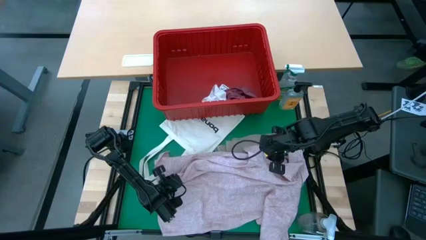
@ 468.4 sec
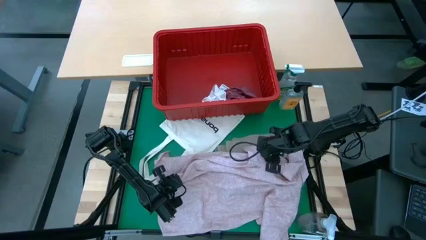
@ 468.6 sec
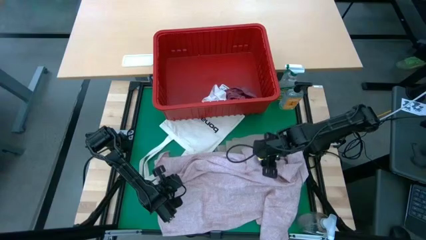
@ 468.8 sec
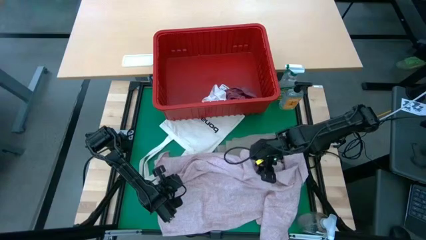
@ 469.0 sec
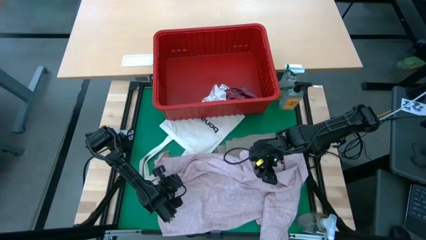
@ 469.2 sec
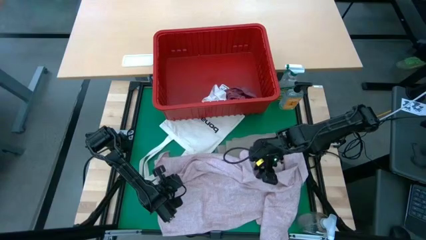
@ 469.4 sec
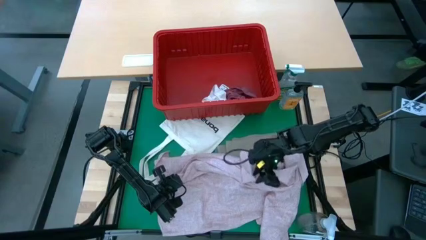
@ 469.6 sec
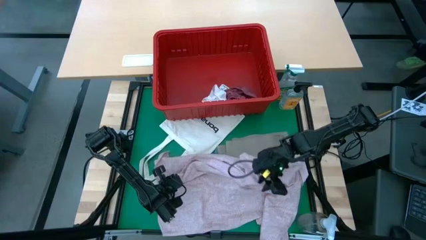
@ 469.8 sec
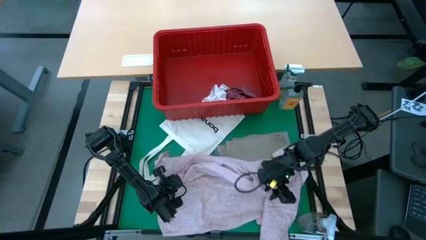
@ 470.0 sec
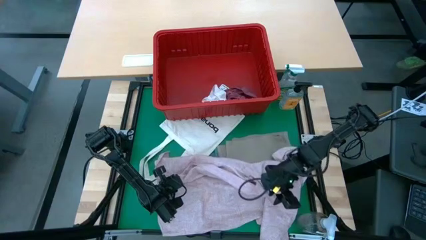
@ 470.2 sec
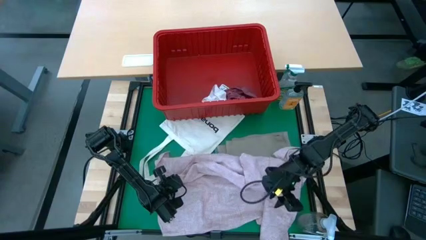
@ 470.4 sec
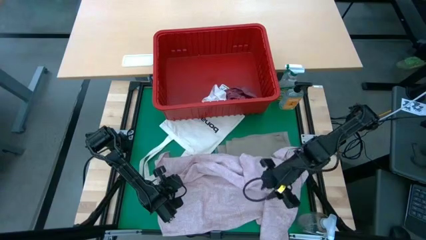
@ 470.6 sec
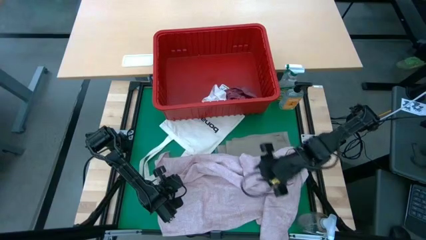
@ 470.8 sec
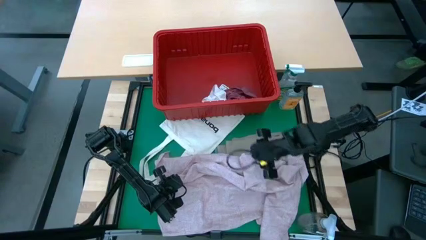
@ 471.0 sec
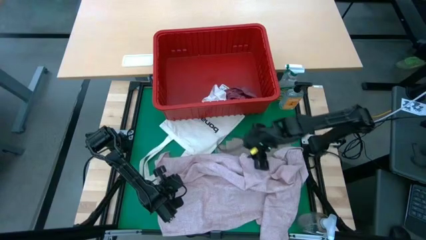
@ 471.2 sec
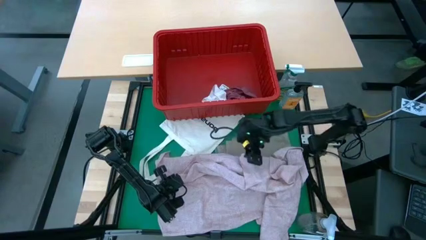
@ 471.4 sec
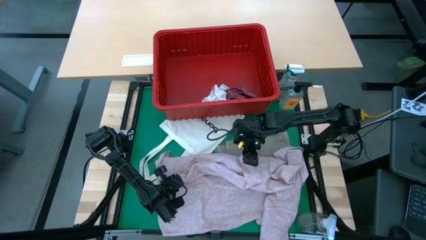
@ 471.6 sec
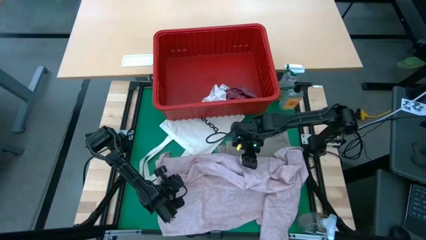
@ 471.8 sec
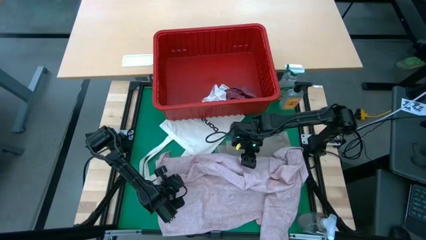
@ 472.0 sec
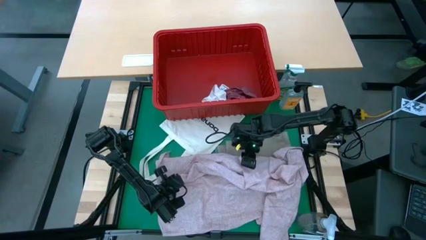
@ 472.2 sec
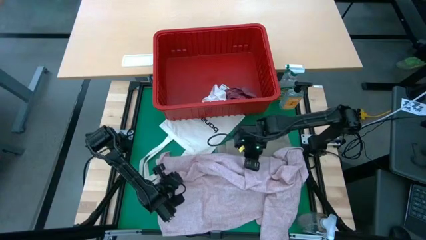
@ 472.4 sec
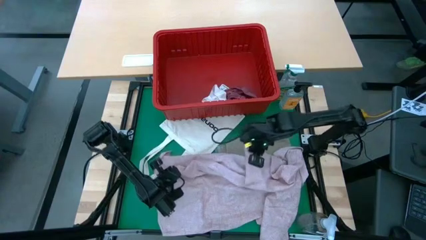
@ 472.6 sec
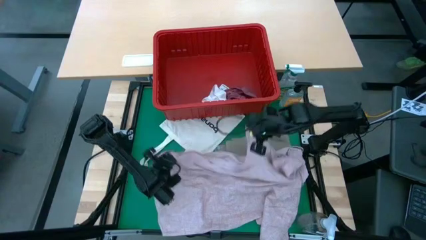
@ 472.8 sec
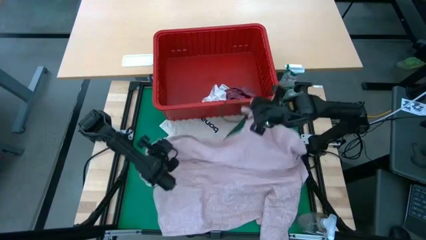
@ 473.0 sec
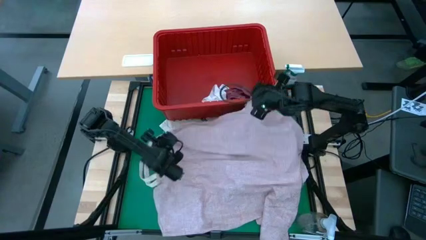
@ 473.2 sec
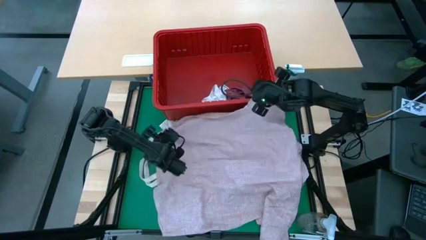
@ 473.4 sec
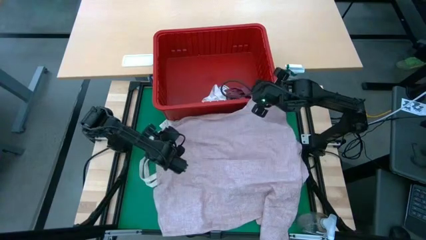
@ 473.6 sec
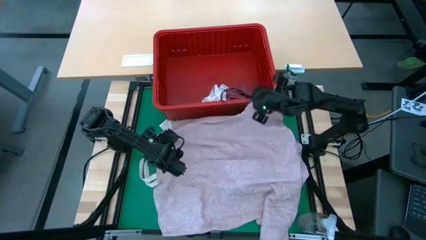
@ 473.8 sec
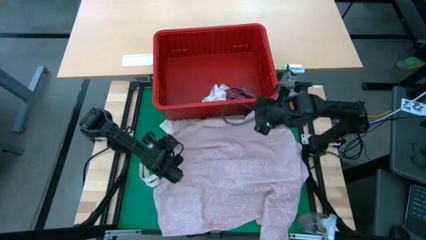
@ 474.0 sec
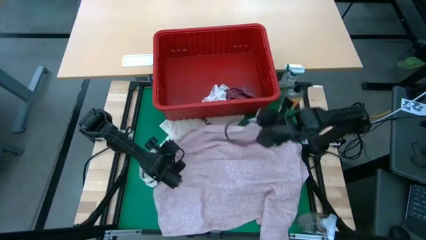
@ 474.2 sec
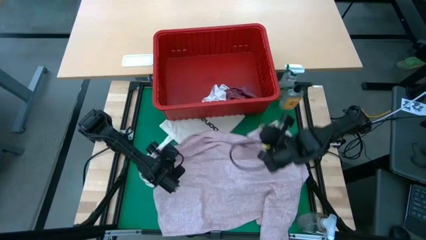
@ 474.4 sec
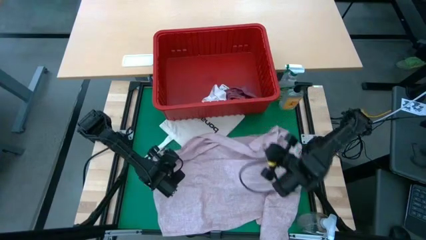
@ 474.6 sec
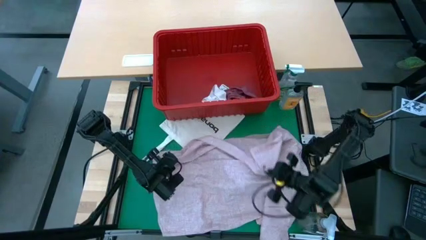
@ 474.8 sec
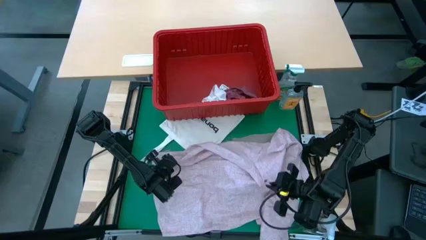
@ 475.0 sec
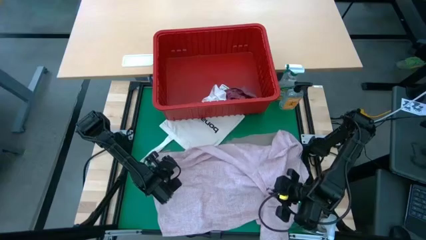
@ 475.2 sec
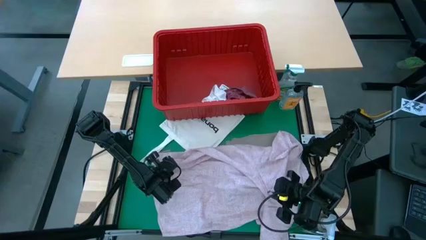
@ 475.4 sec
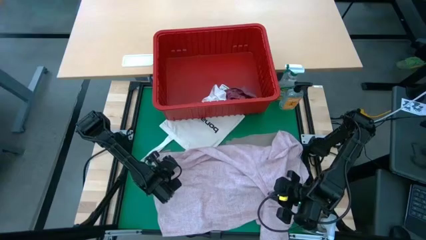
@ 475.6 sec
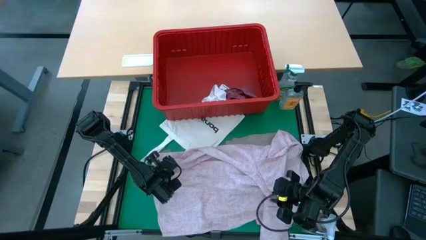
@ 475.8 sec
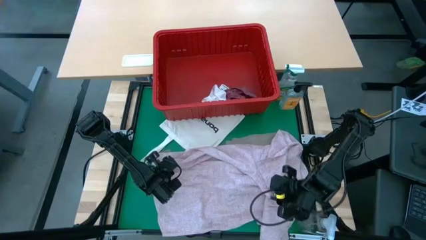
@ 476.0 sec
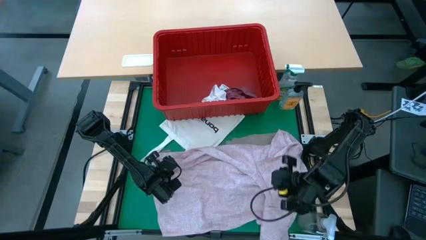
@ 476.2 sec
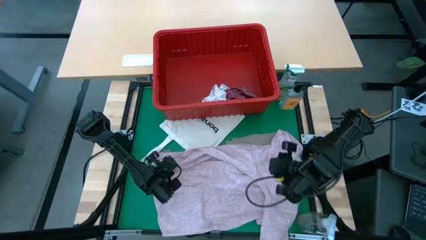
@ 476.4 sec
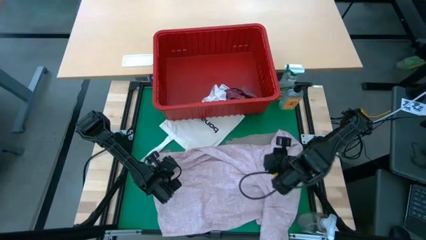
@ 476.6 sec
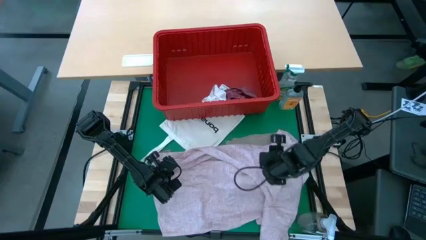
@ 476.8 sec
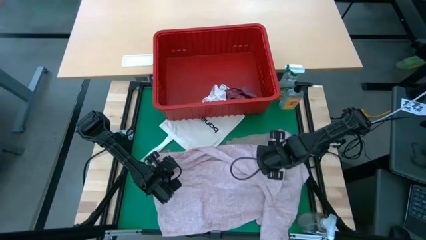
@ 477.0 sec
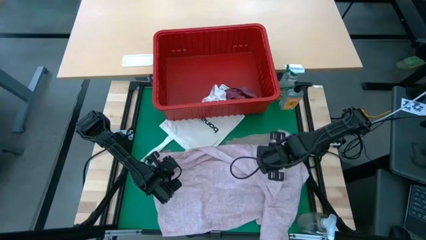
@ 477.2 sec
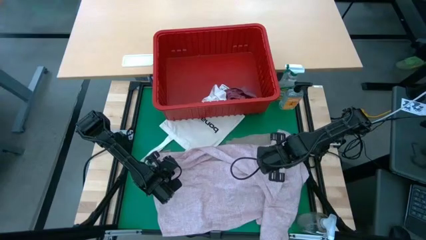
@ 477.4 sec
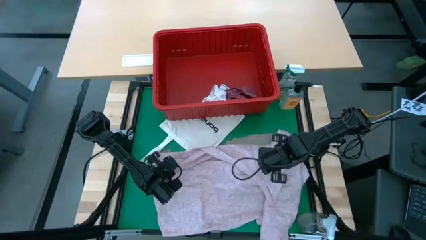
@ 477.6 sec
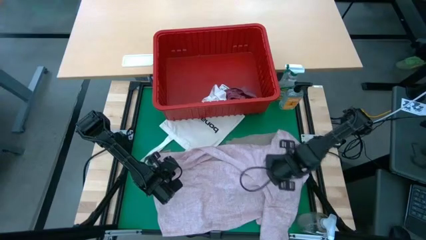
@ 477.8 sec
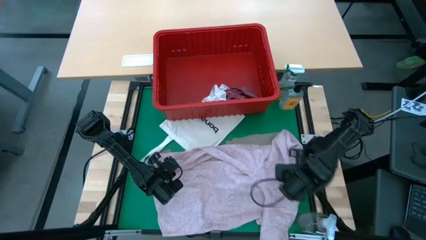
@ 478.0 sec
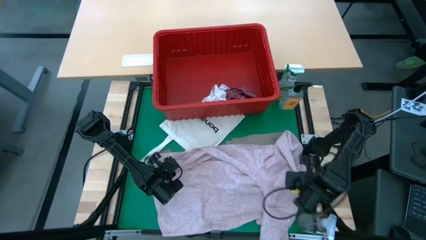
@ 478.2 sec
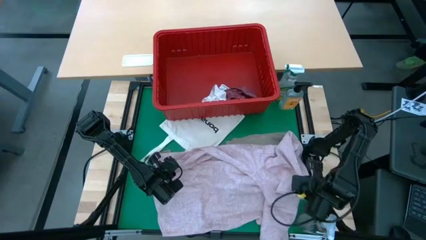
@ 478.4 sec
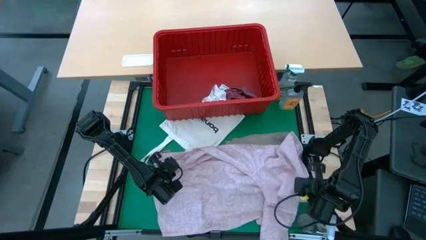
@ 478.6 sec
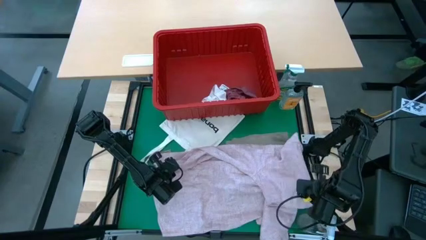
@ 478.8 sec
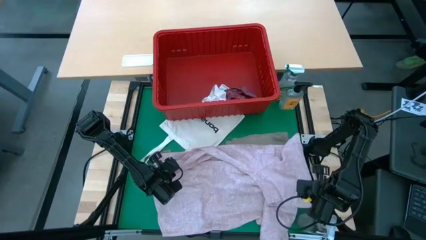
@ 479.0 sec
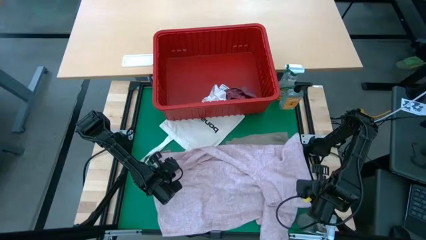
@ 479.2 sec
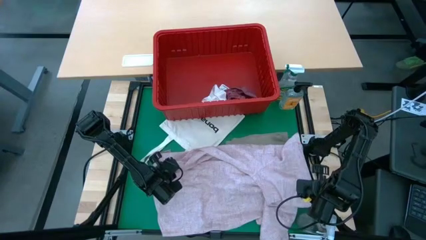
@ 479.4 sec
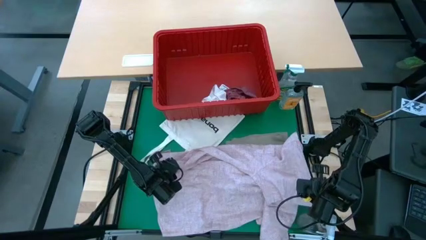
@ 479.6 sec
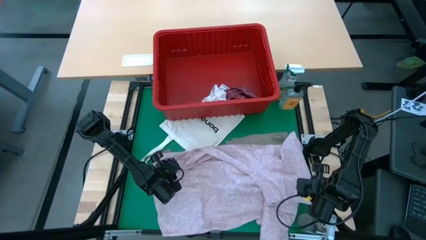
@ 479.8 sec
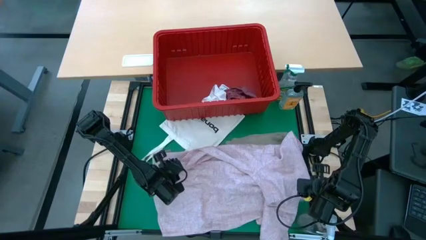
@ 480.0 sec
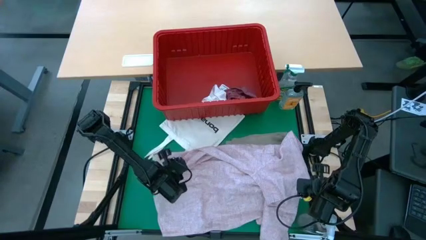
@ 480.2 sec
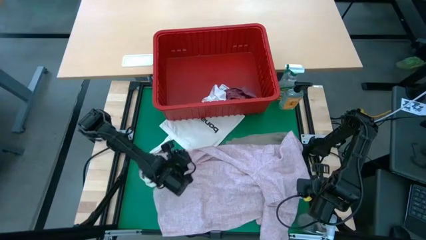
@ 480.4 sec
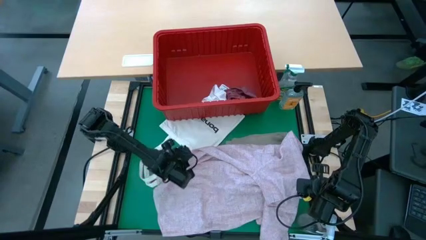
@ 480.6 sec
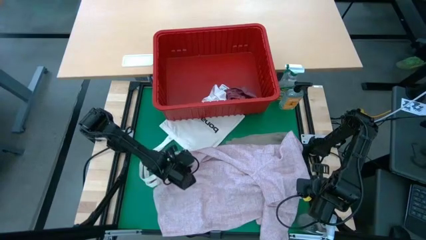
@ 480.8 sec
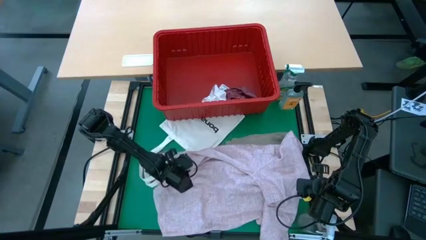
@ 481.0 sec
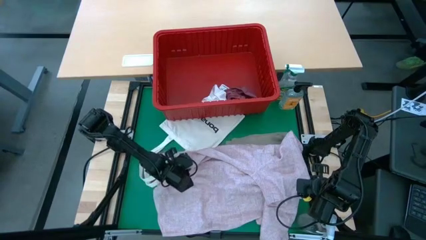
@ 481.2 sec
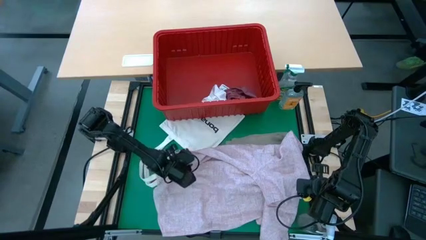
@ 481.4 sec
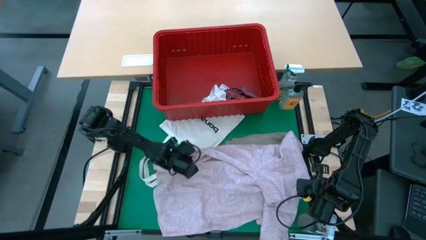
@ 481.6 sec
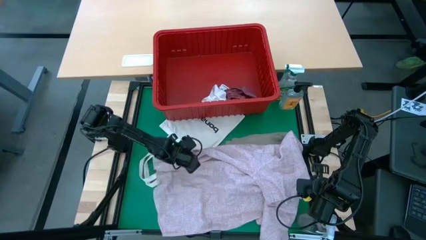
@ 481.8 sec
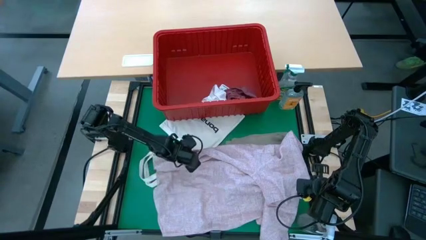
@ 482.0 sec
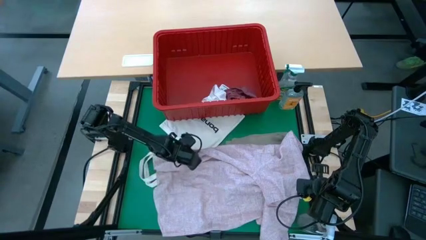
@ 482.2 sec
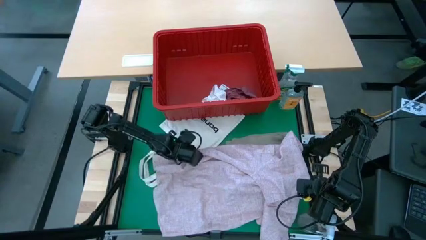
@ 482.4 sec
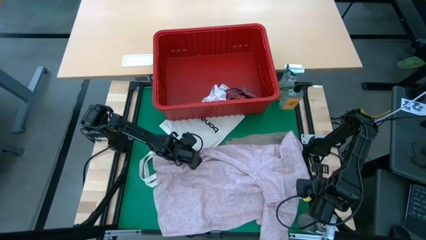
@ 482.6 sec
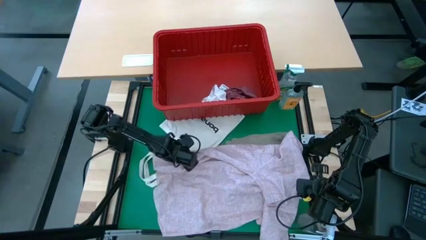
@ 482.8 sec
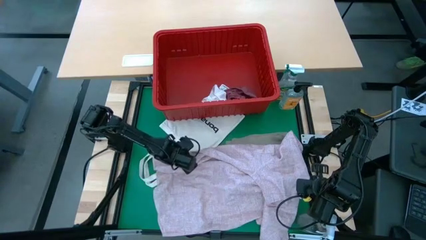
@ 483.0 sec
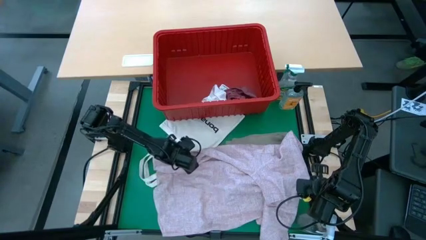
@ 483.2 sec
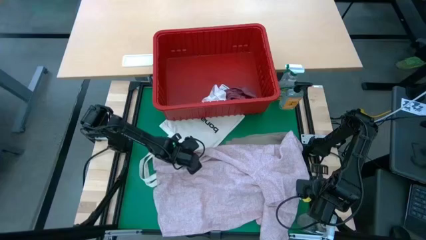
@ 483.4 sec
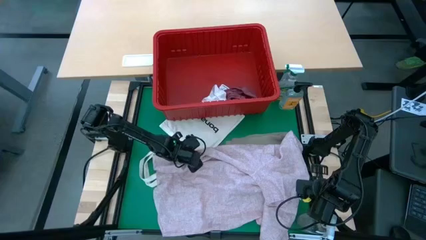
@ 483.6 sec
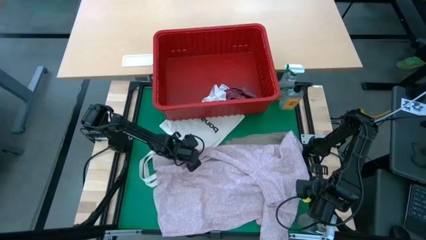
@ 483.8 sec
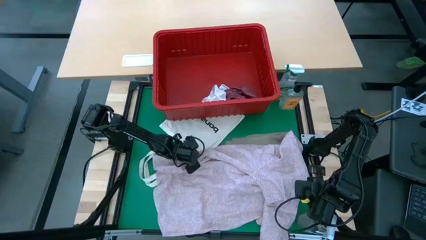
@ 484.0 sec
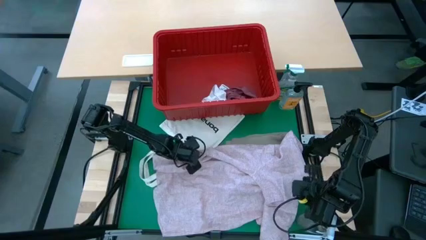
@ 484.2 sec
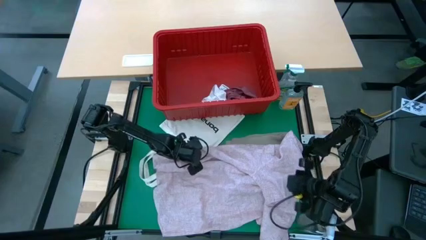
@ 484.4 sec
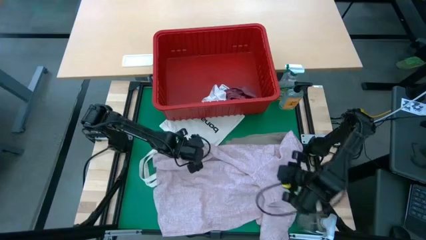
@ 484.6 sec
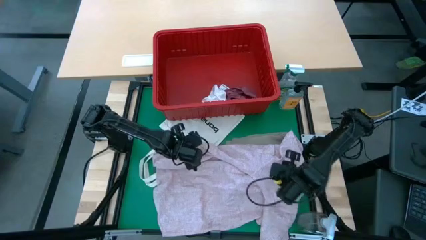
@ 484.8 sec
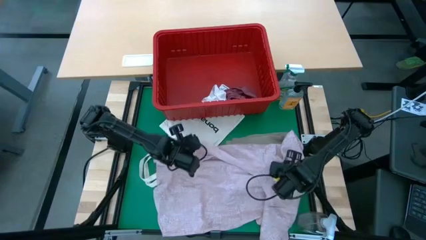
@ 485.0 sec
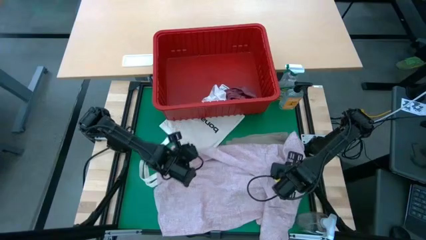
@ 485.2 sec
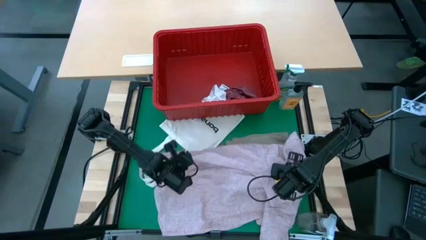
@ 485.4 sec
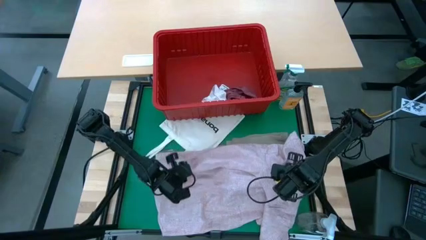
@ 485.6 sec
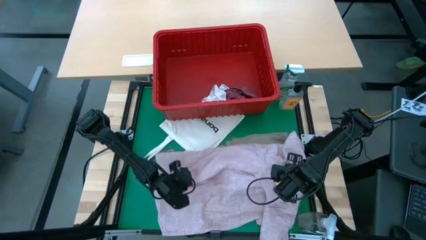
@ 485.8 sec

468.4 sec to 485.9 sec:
Task: Fold laundry
Fold the pink shirt
